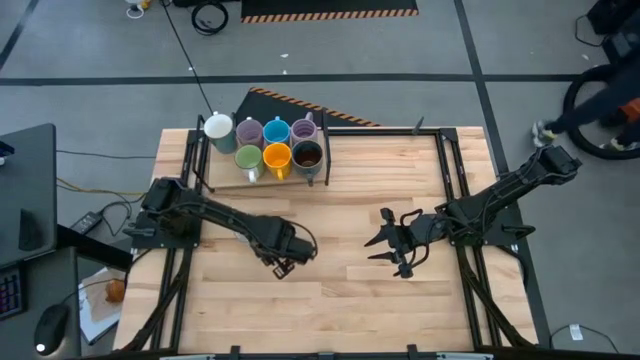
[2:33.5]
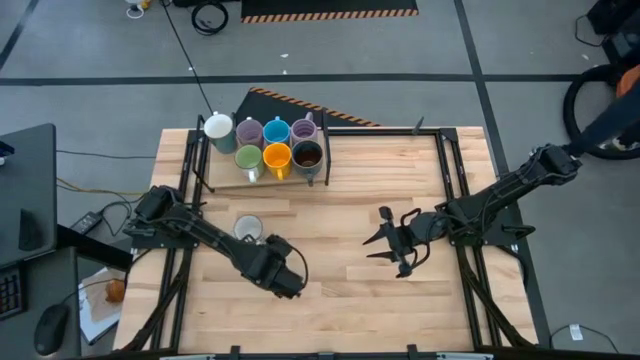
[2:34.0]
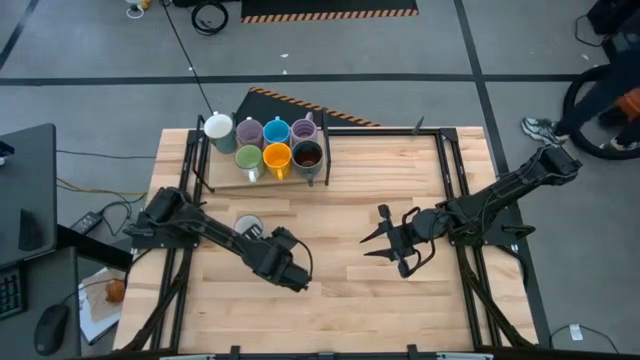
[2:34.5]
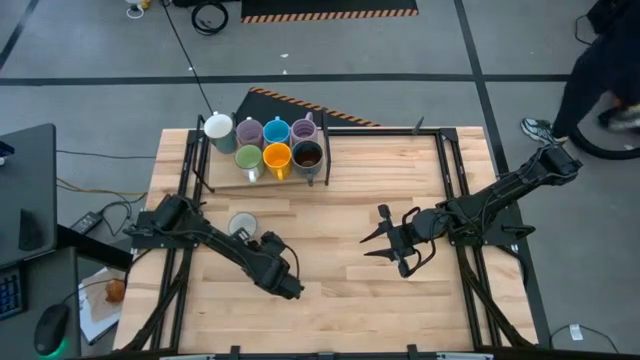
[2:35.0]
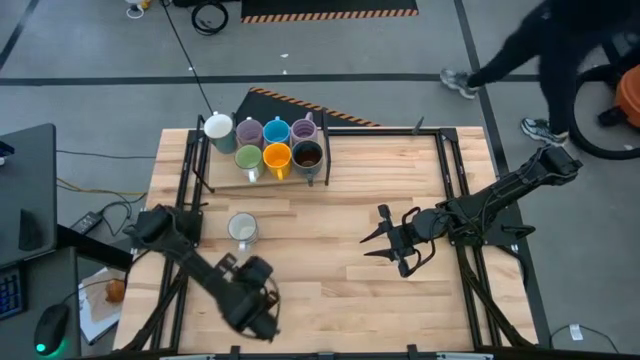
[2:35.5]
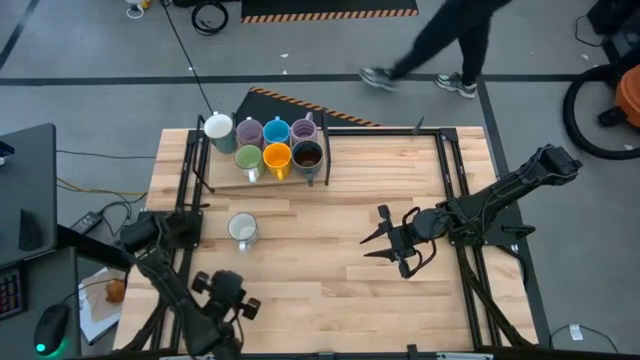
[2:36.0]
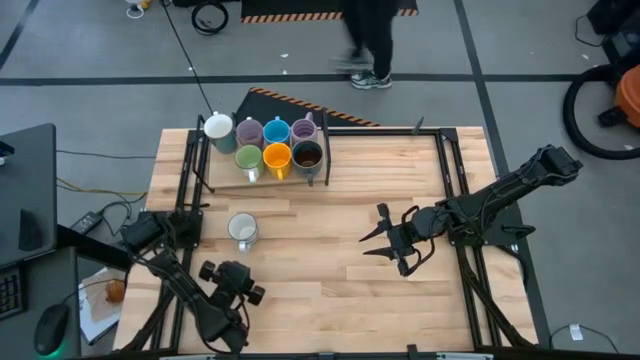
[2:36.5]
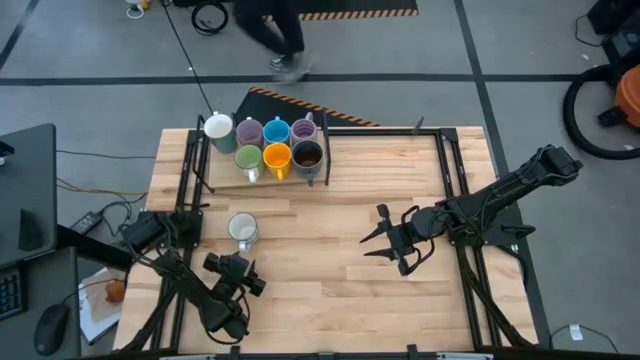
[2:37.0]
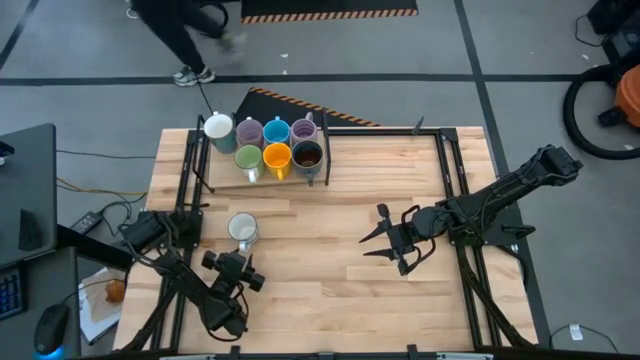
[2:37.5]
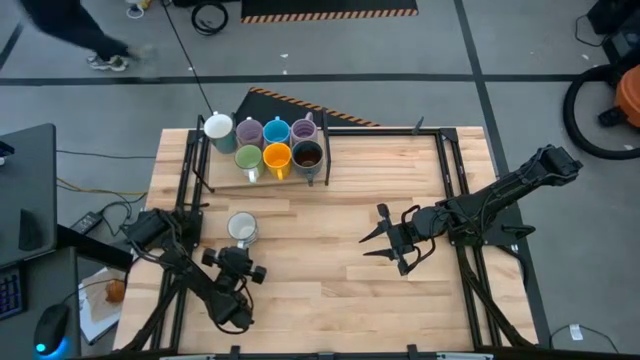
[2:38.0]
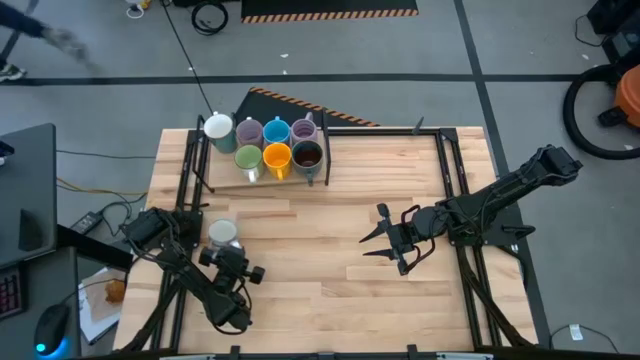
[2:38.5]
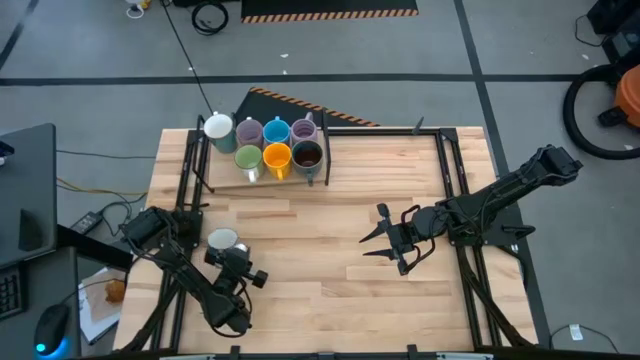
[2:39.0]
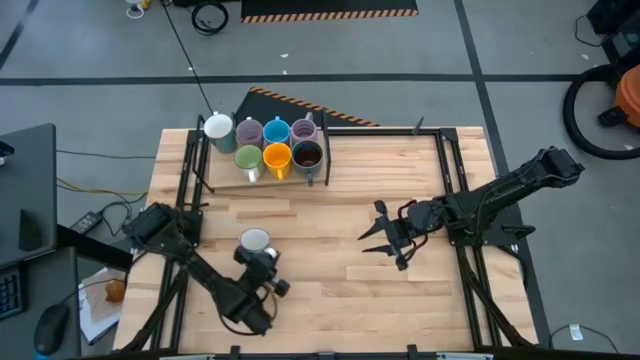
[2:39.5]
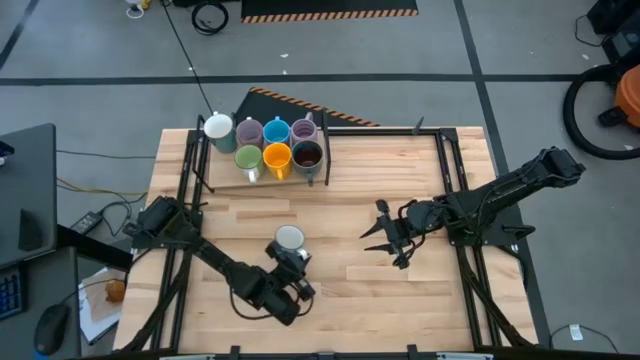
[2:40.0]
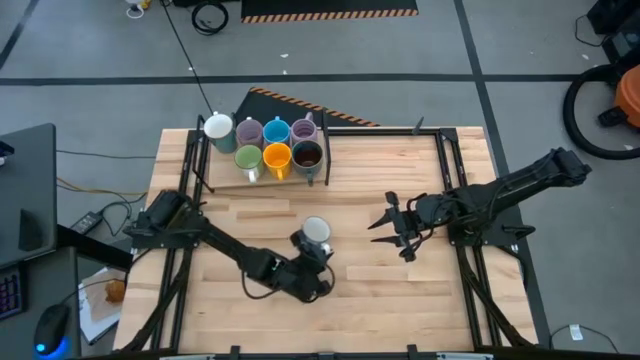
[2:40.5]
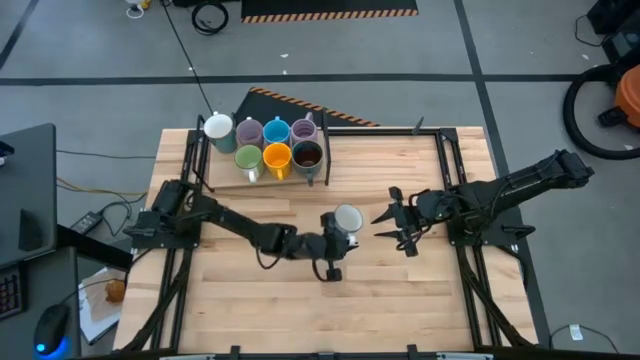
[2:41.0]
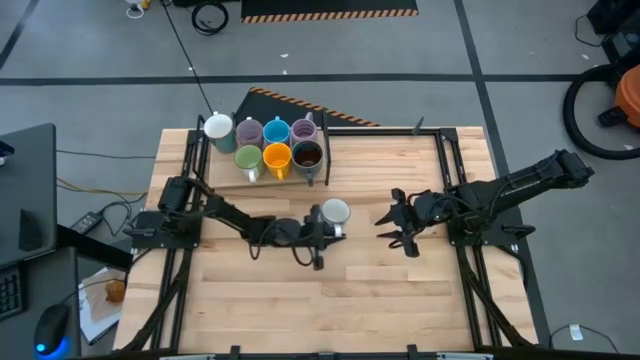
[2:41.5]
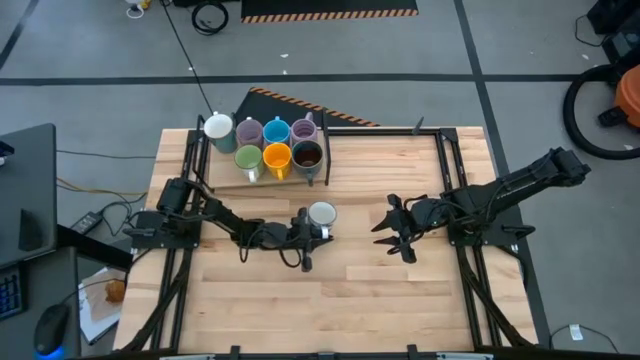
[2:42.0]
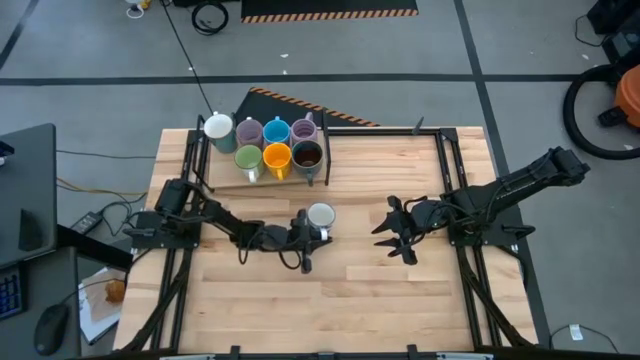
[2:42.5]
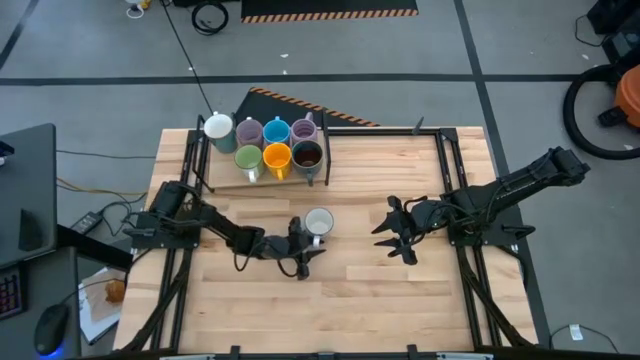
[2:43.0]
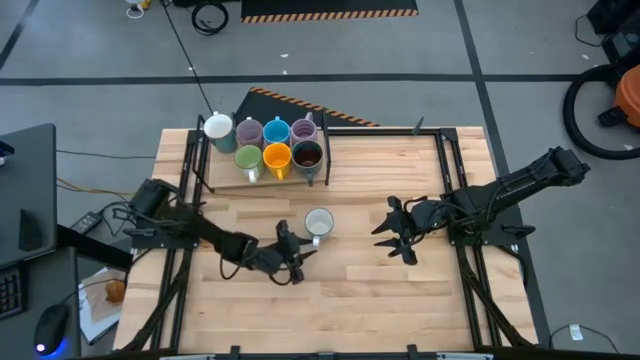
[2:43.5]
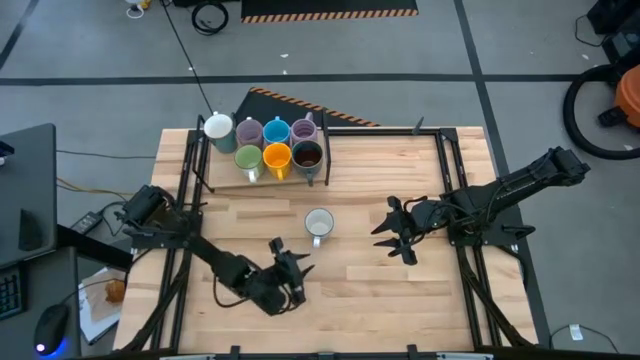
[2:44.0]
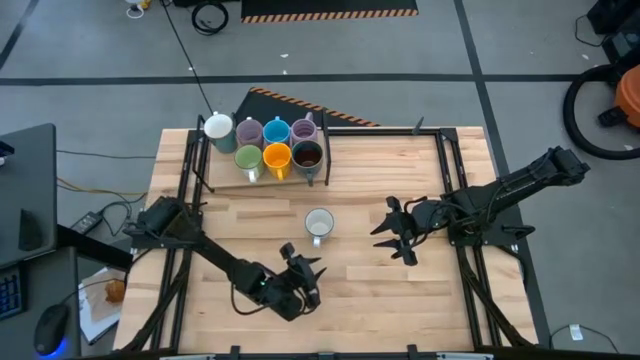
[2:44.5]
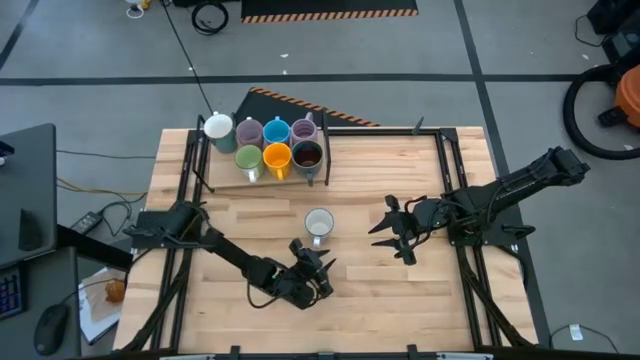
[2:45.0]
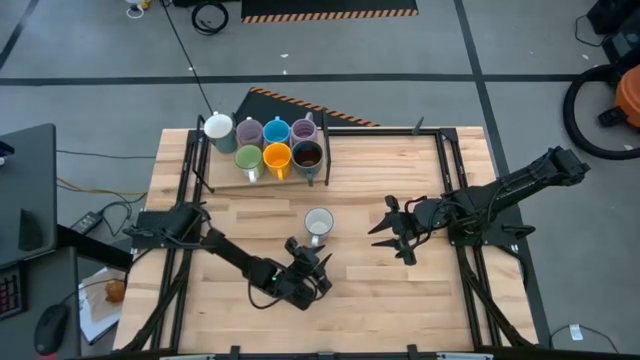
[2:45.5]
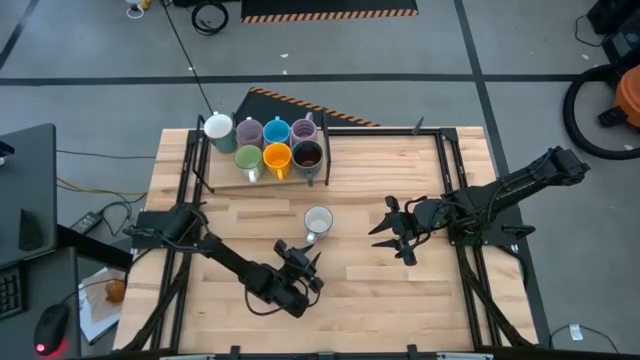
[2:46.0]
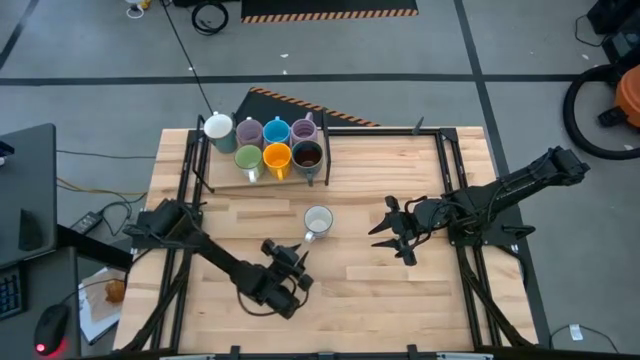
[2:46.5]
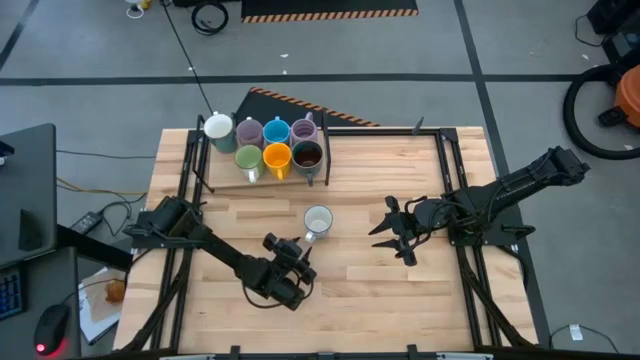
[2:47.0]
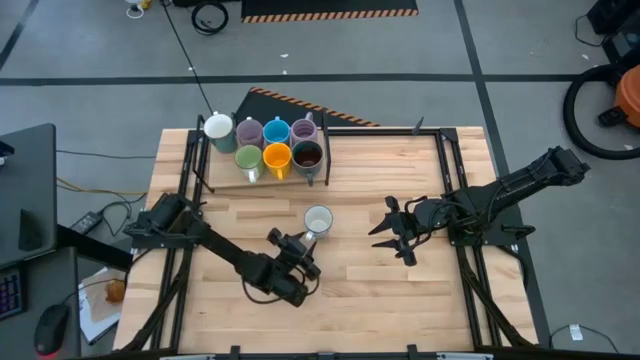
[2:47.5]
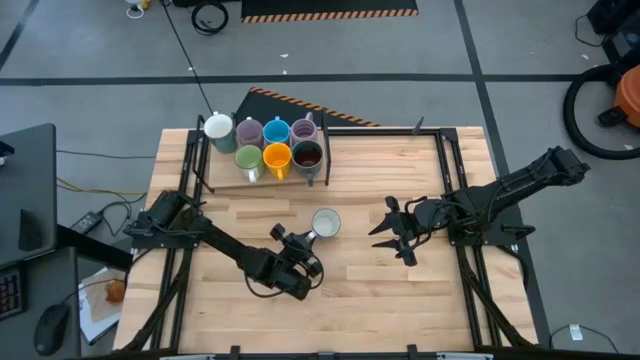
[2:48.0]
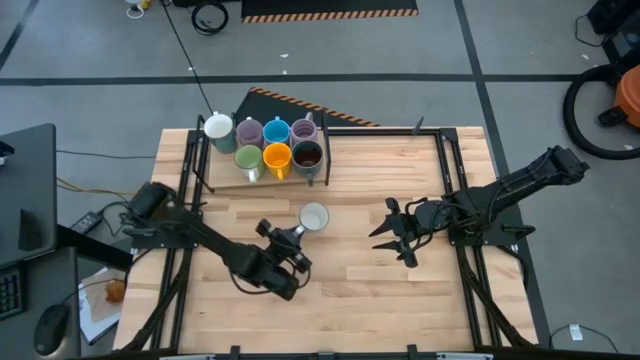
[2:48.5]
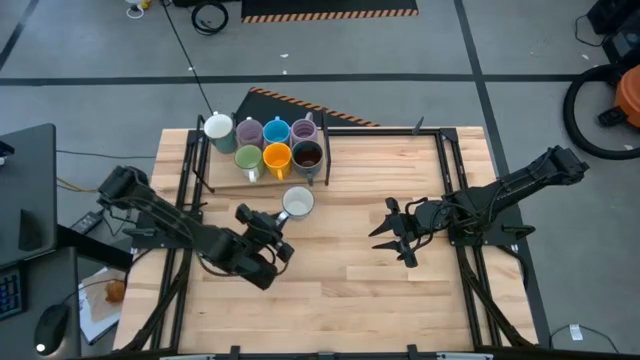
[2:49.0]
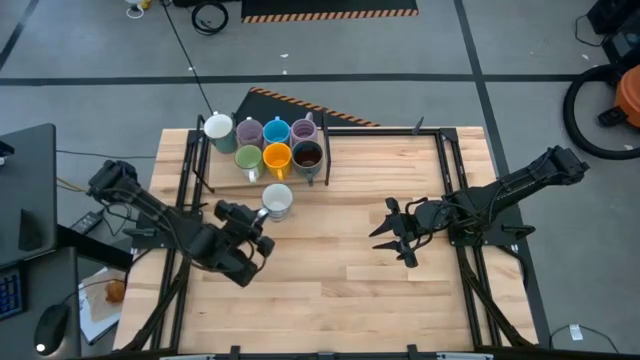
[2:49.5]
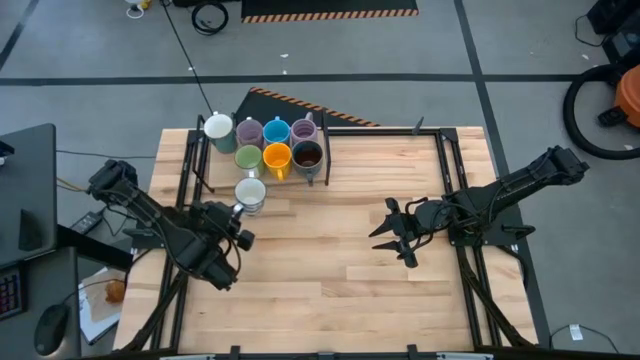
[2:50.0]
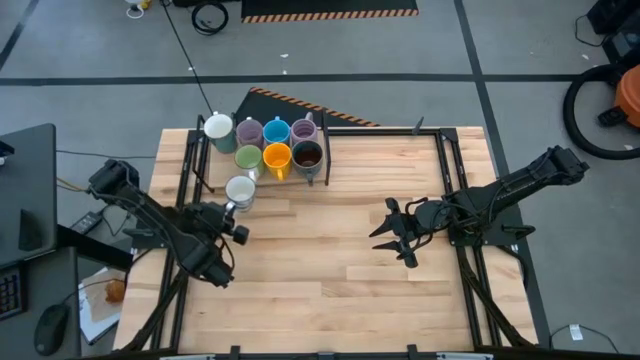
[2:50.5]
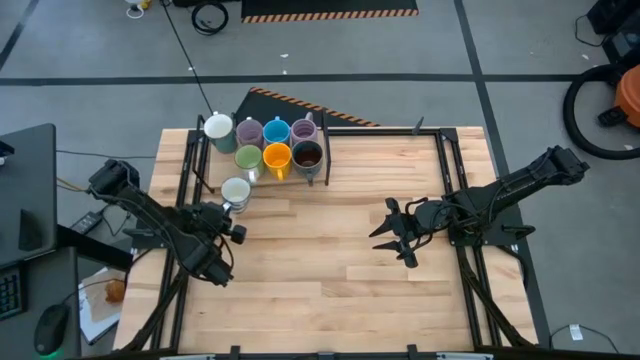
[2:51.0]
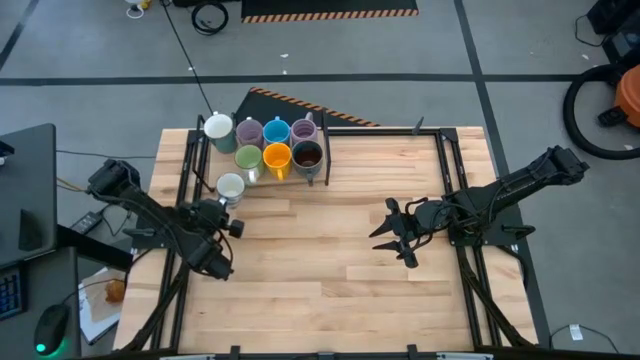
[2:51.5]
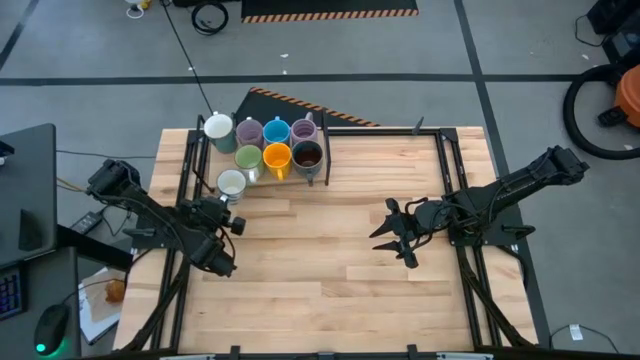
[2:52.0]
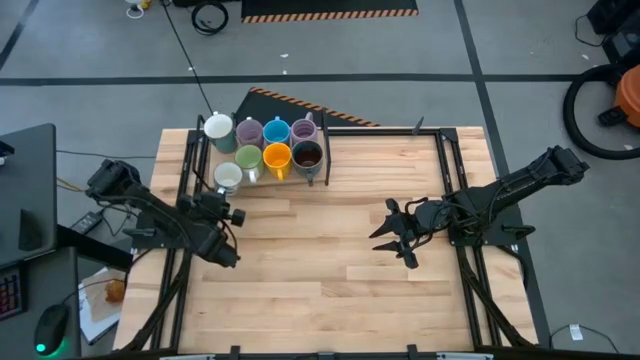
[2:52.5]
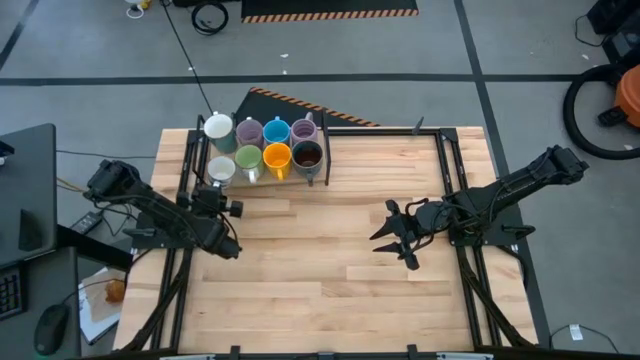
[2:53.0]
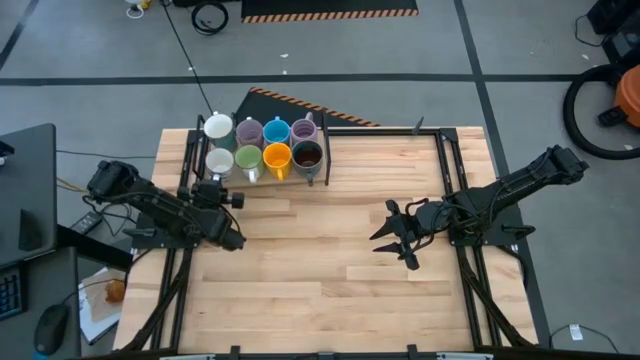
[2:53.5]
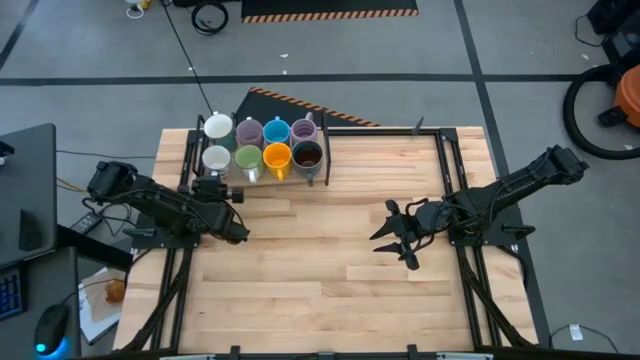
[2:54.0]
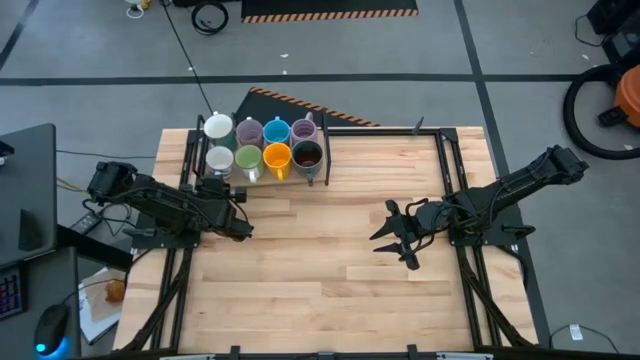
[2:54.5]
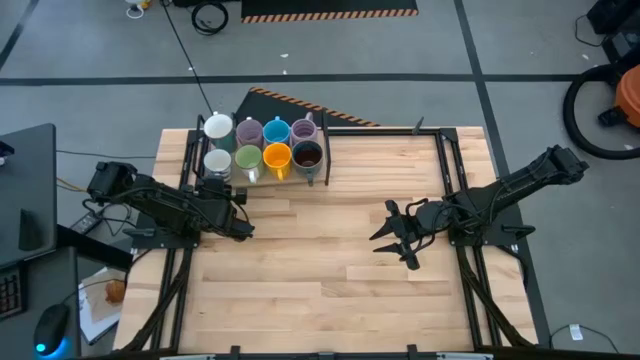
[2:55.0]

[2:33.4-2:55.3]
Task: Place coffee mugs
Put the blue patterned mug on the shelf
